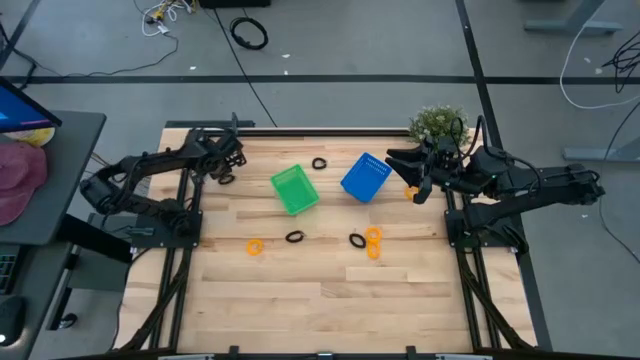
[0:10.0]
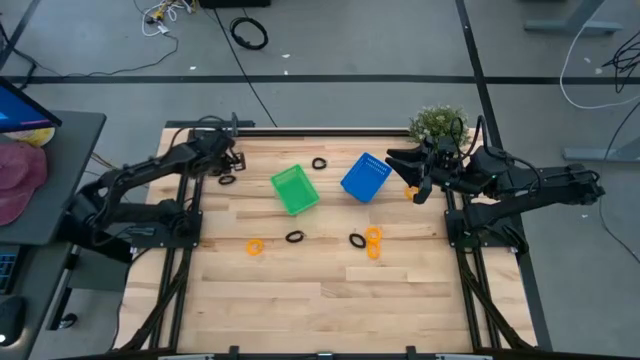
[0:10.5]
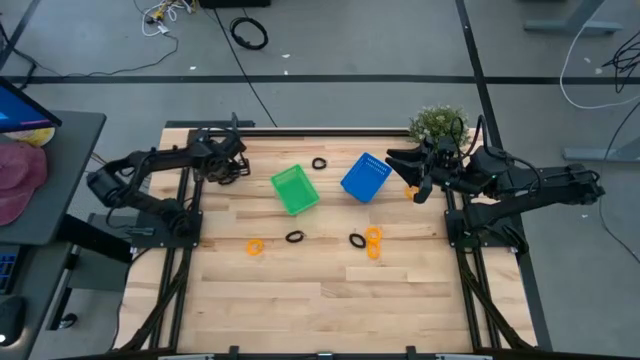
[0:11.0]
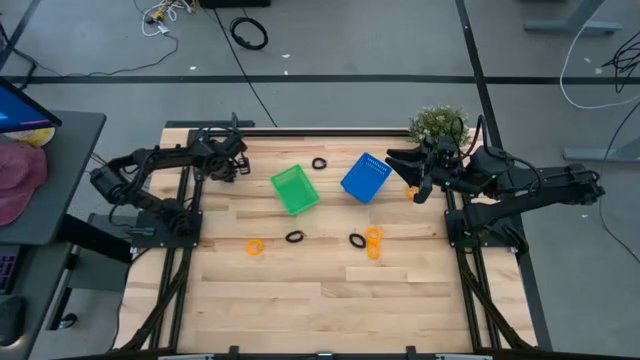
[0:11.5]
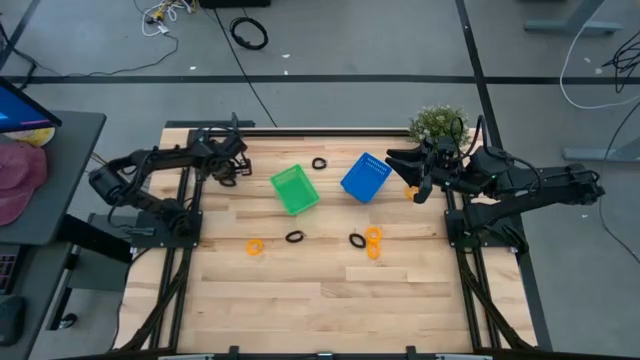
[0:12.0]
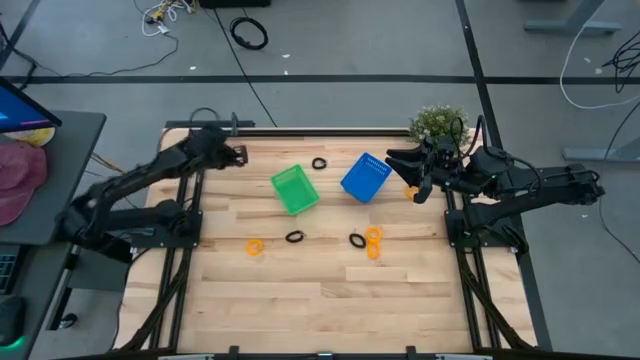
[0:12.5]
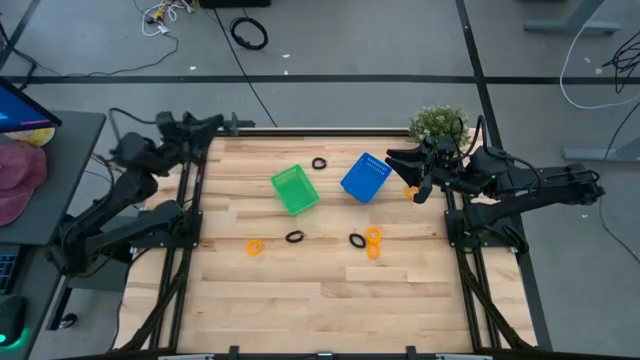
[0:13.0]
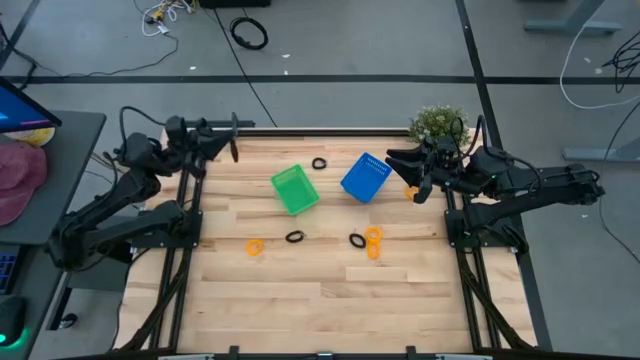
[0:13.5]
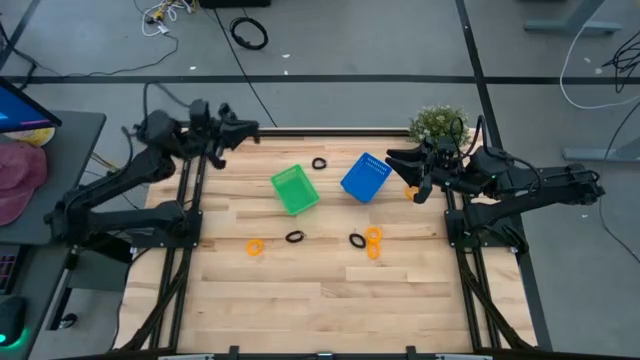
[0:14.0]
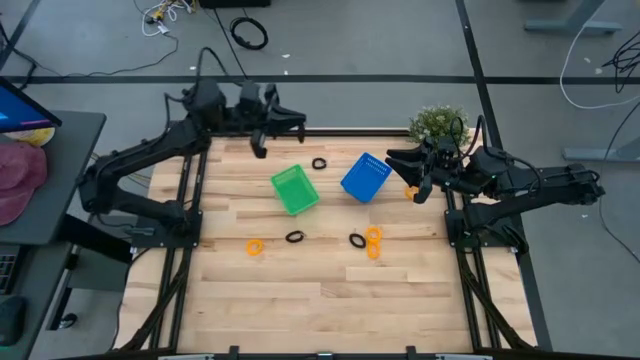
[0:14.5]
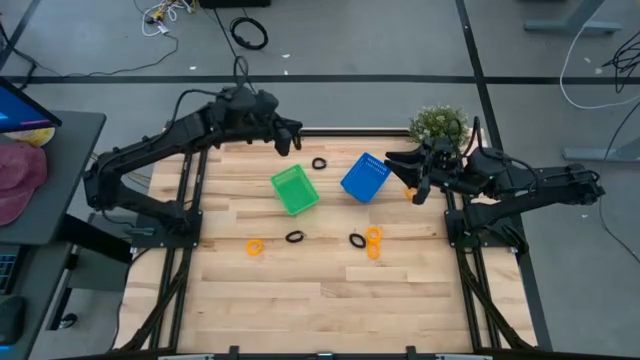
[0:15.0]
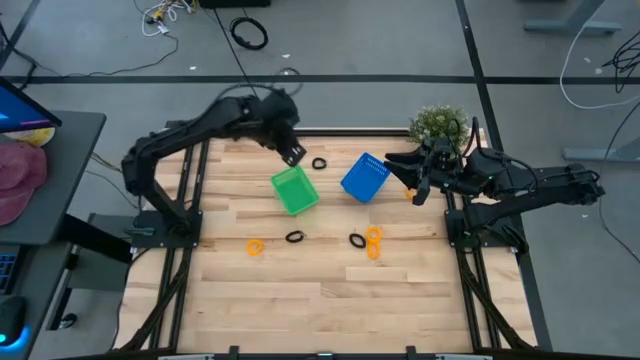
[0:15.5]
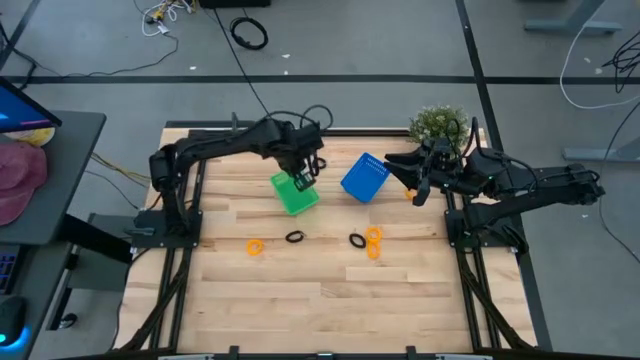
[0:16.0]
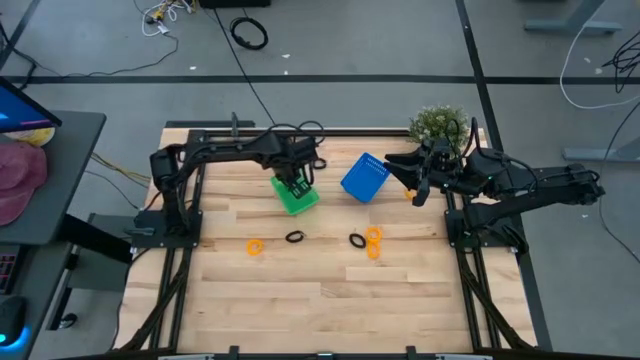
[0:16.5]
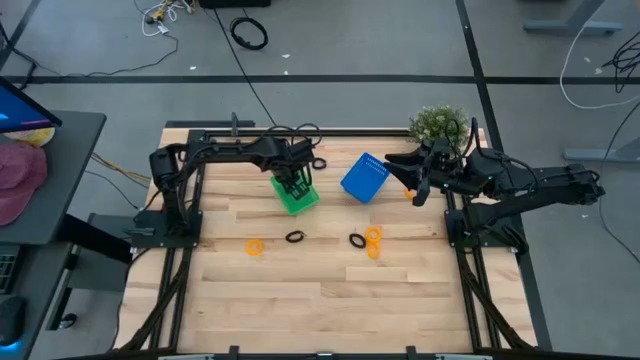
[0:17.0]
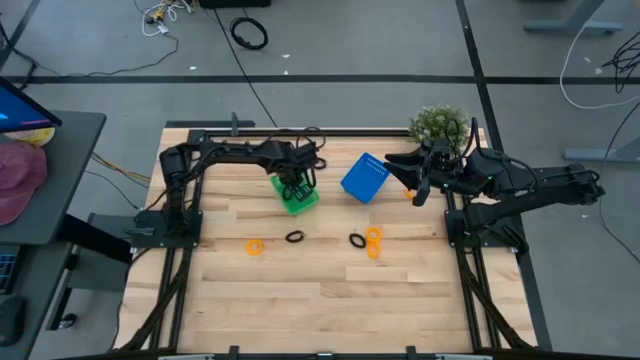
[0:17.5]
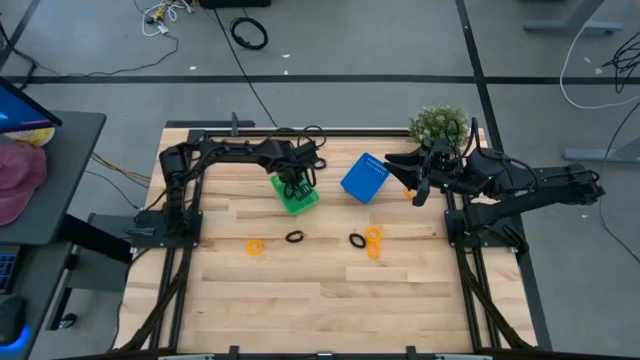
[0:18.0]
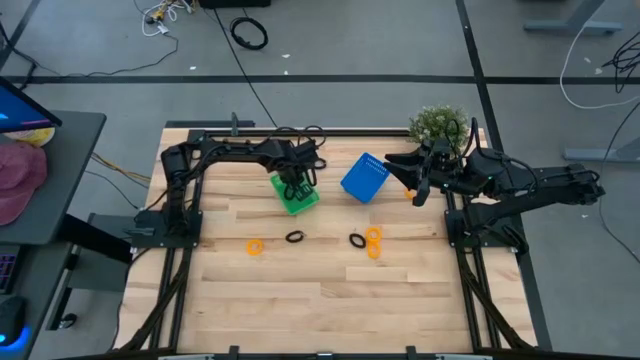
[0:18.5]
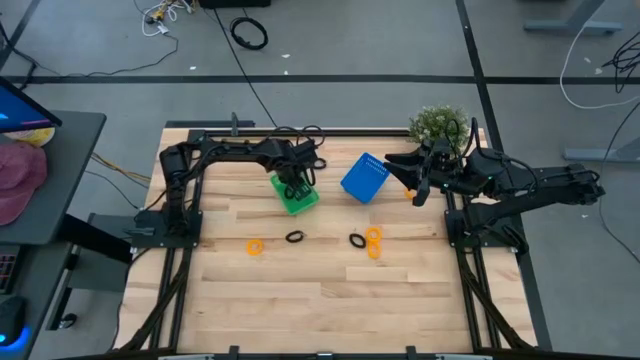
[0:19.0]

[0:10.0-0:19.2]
Task: Sort spring keychains
Put the black spring keychain into the green bin

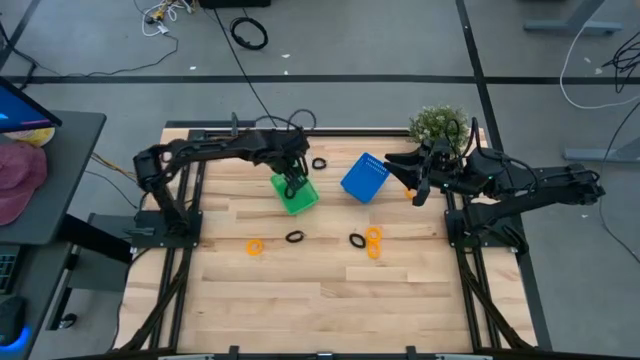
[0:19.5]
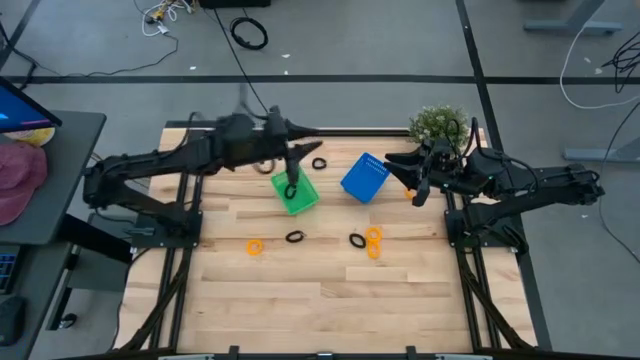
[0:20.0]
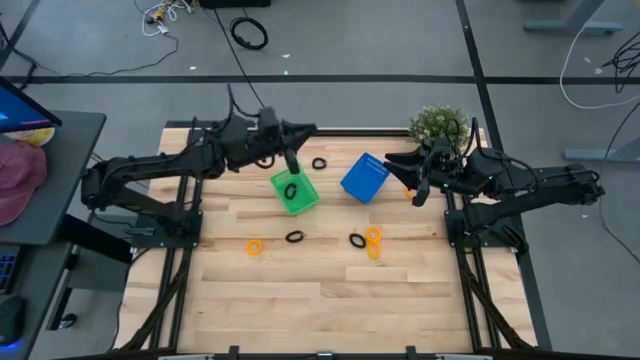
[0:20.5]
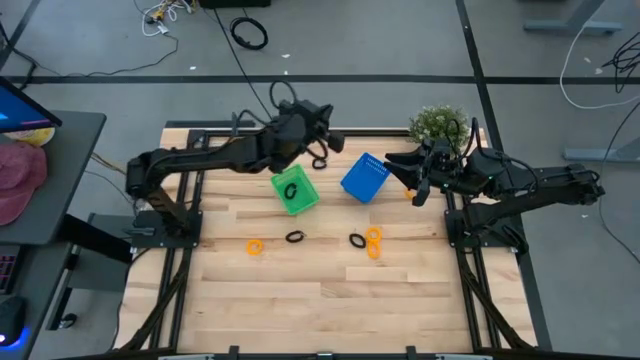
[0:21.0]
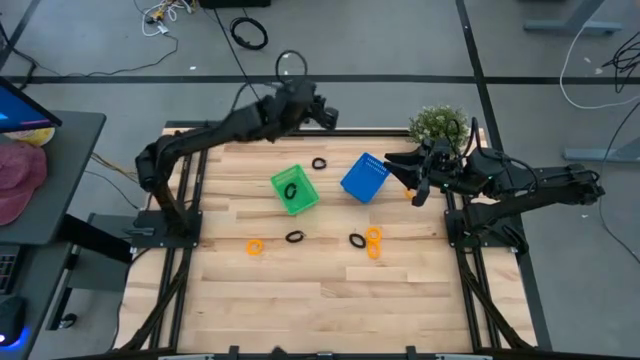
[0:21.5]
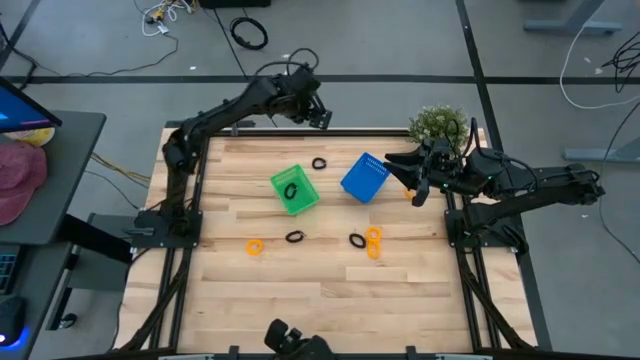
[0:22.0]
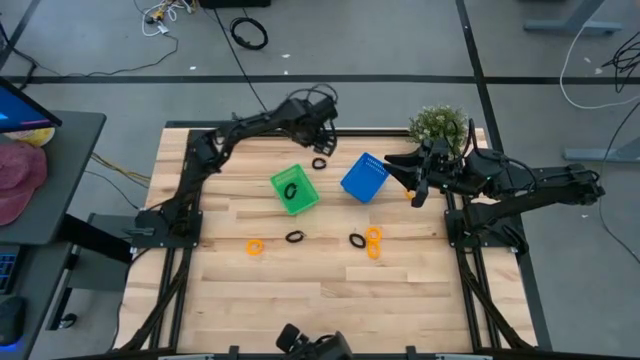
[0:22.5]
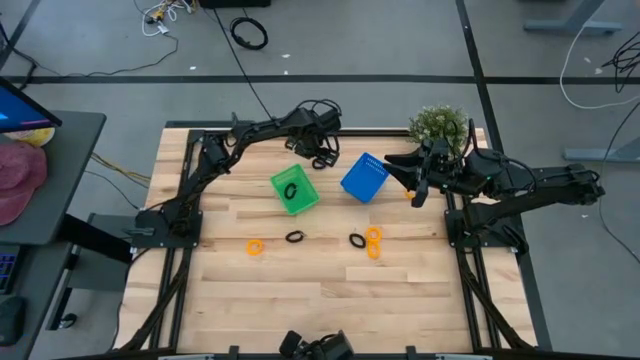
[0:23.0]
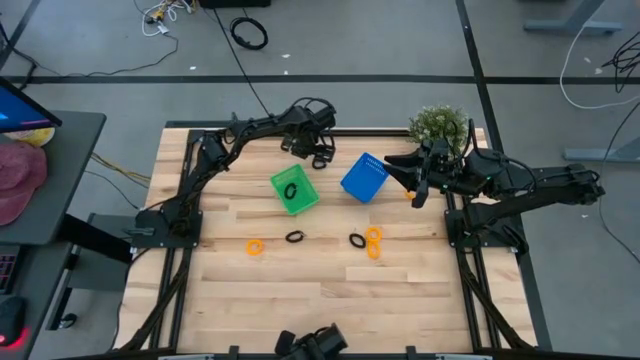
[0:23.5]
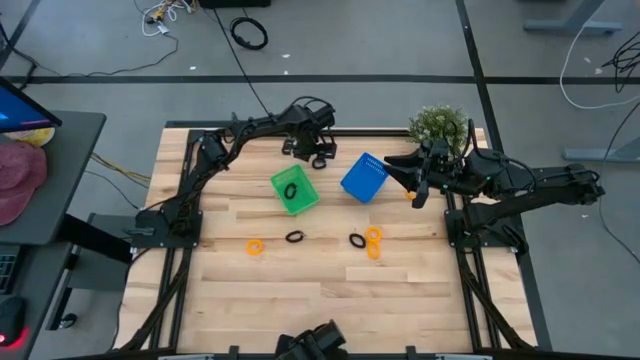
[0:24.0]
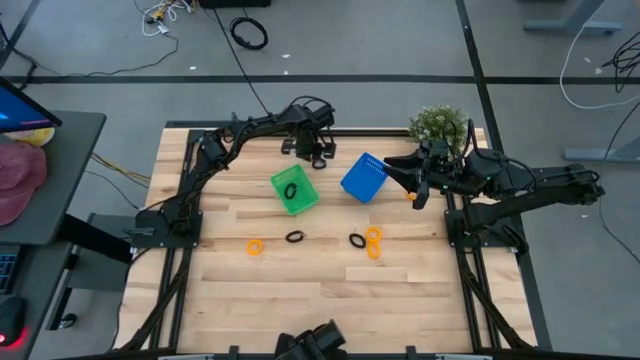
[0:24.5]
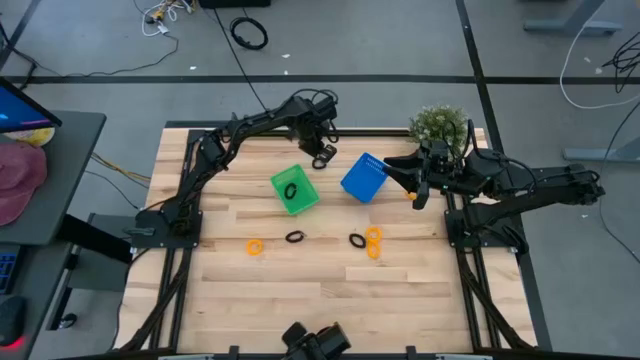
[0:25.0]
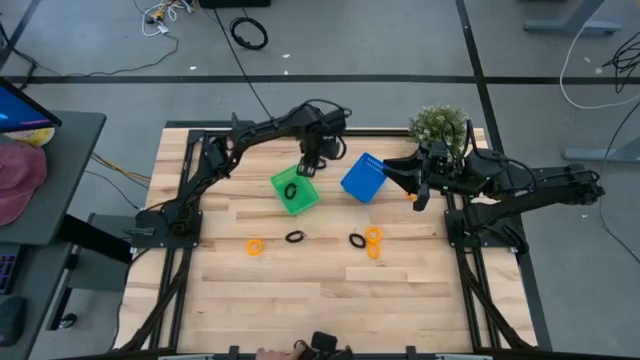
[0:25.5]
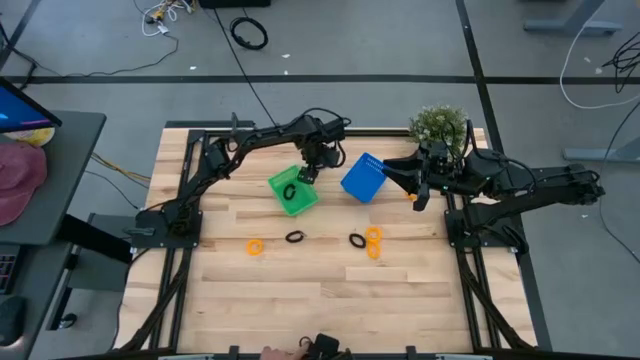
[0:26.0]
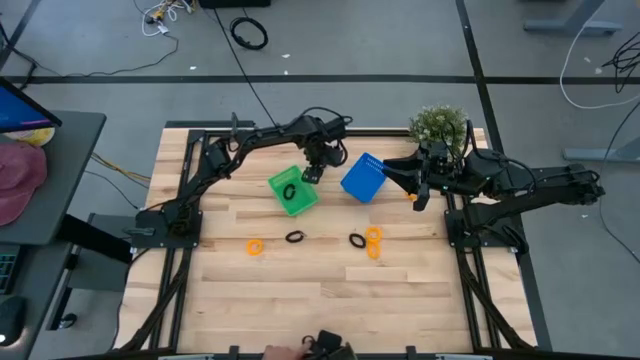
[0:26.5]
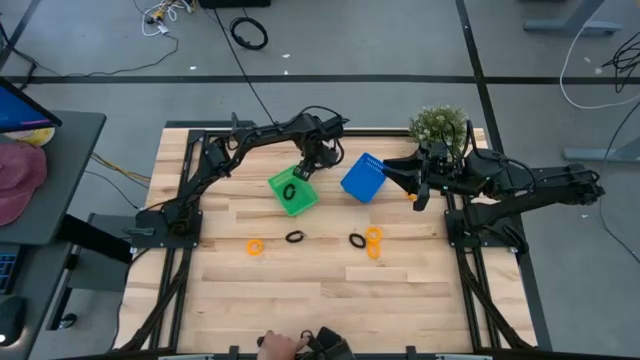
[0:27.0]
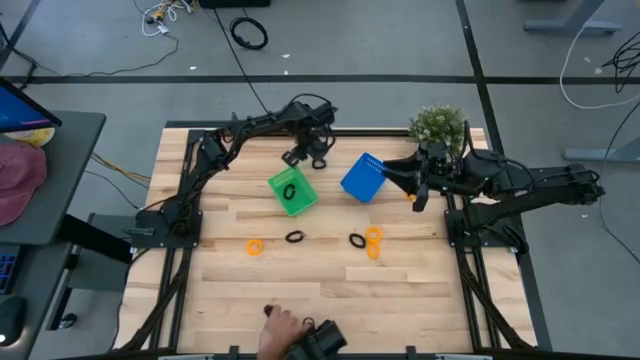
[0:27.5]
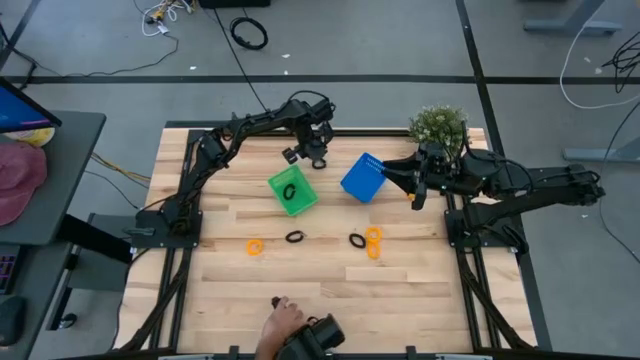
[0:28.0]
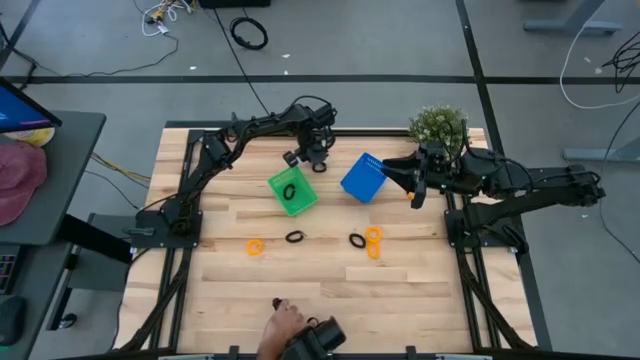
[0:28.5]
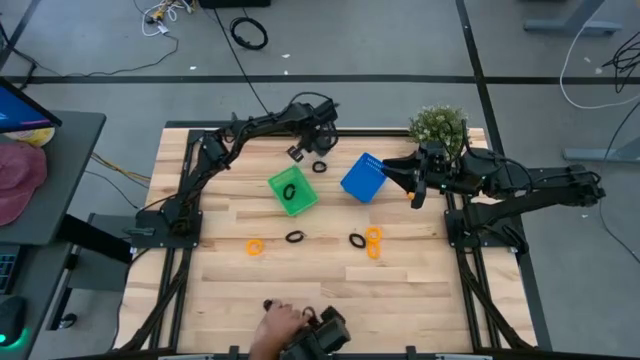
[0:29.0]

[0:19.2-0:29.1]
Put the black spring keychain into the green bin
